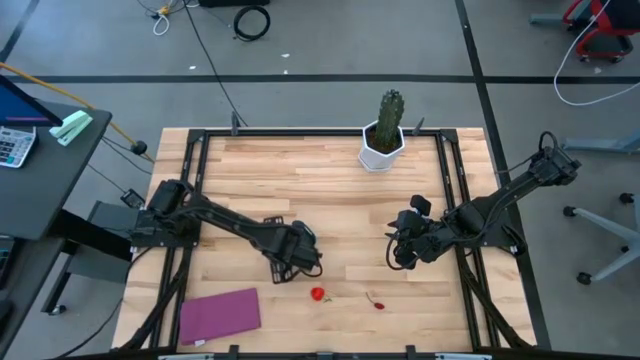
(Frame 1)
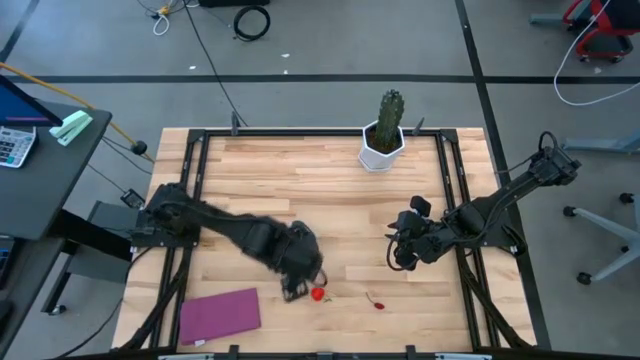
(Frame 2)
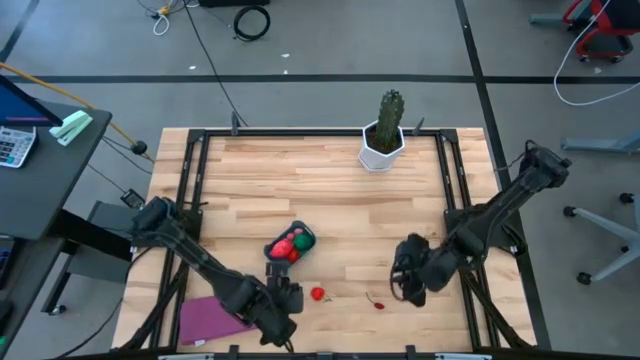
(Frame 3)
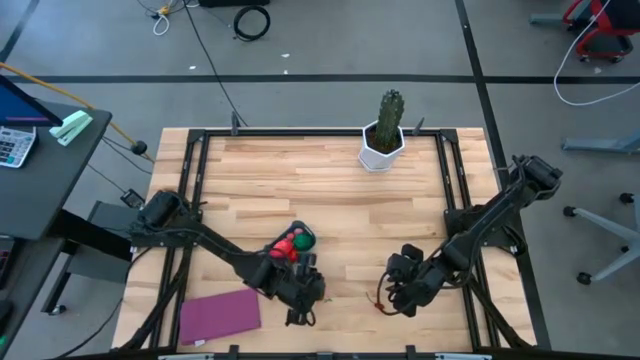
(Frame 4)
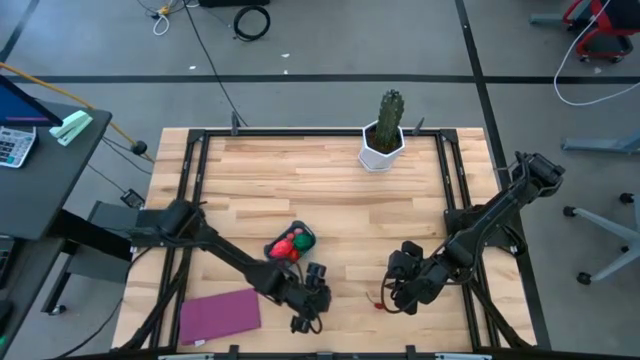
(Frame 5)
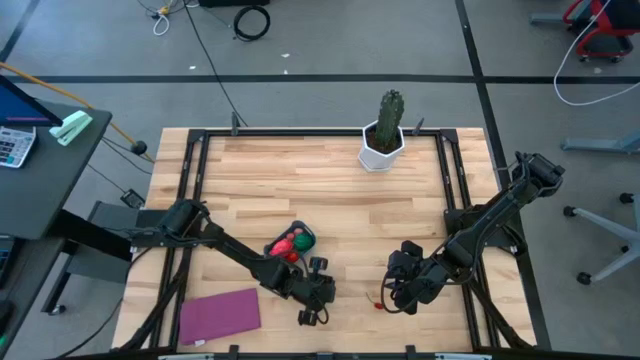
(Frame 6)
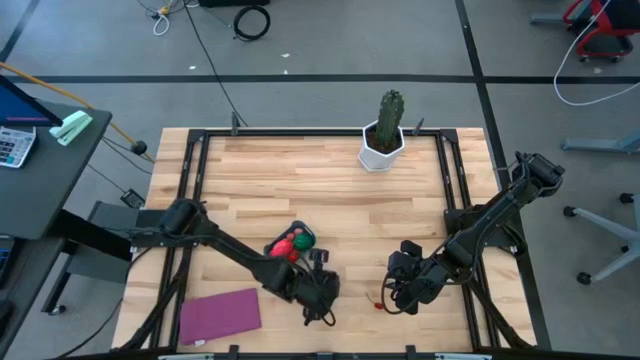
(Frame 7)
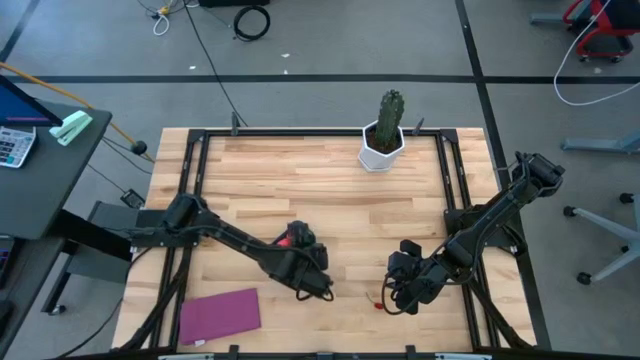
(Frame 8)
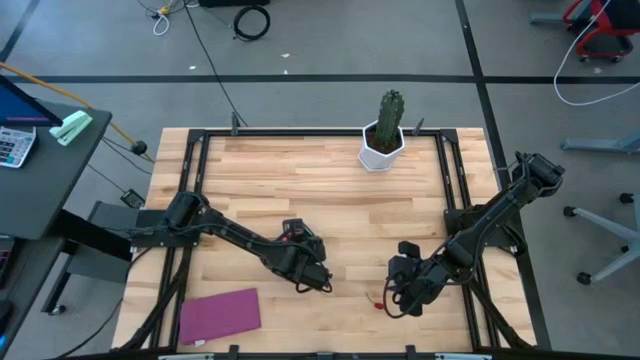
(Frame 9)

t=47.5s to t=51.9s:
Task: Pick and placing Produce into tupperware
Put the red strawberry into the blue bin

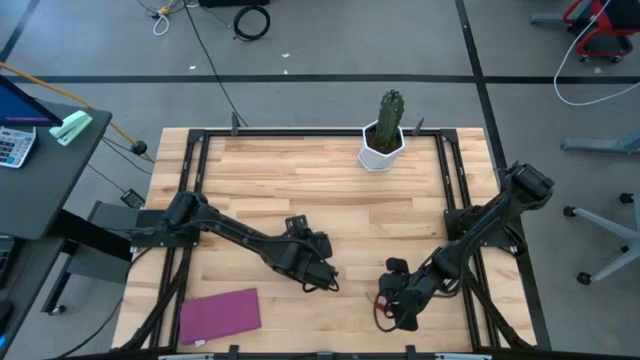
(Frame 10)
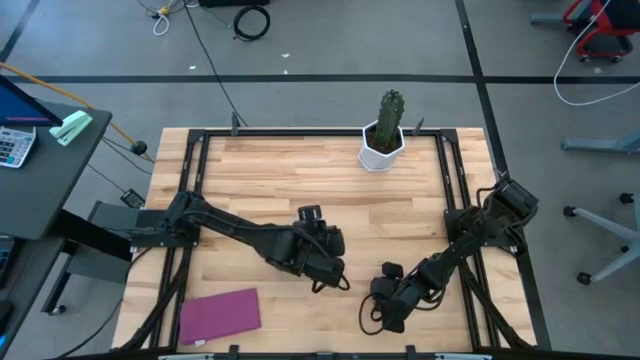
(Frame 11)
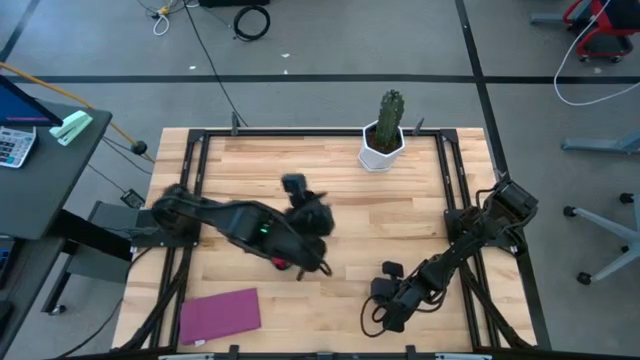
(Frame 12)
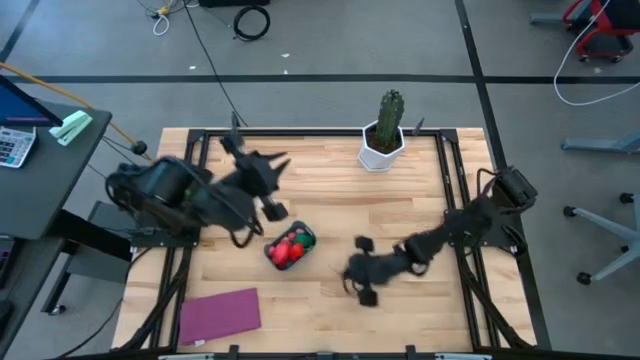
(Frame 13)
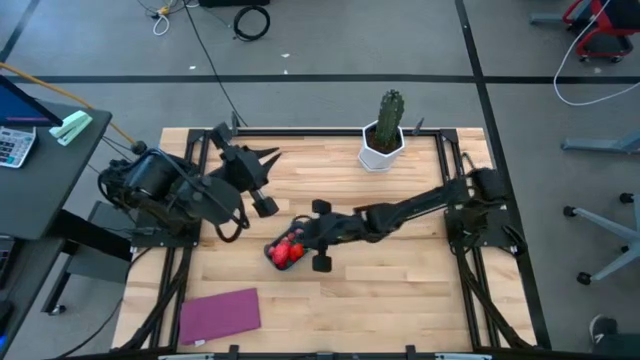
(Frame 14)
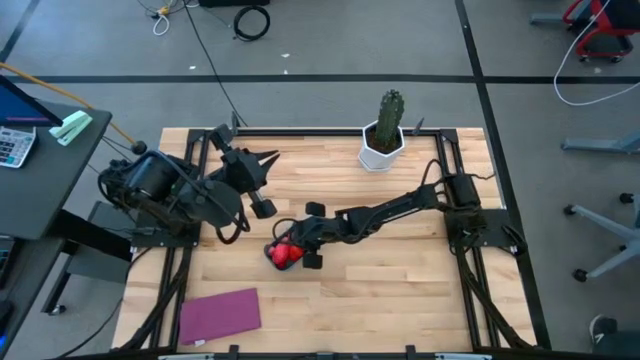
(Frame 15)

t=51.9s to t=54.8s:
Put the red cherry into the blue bin

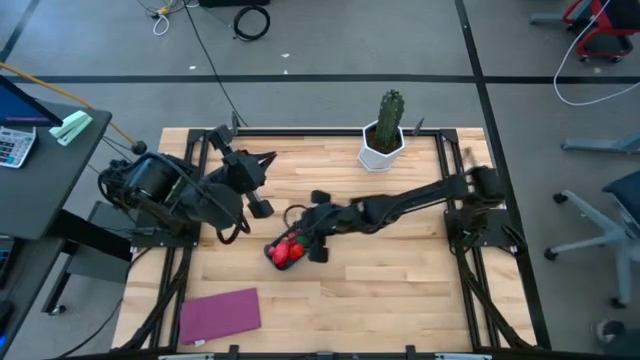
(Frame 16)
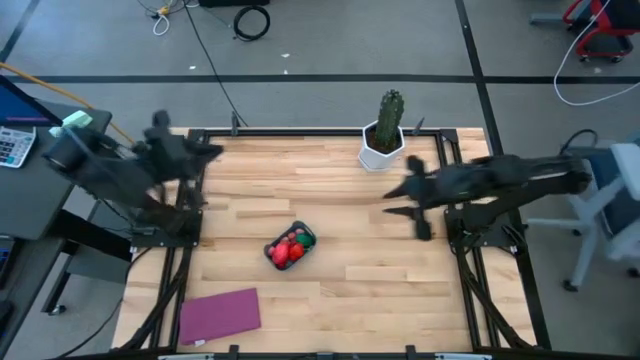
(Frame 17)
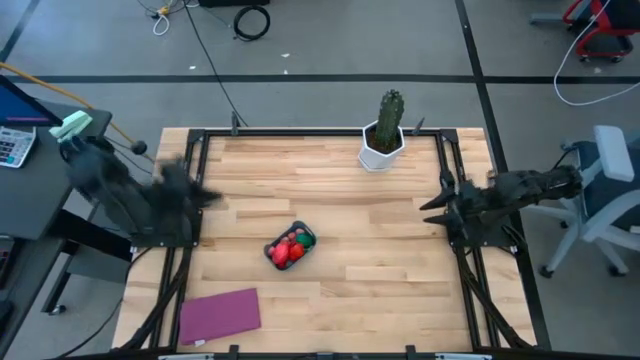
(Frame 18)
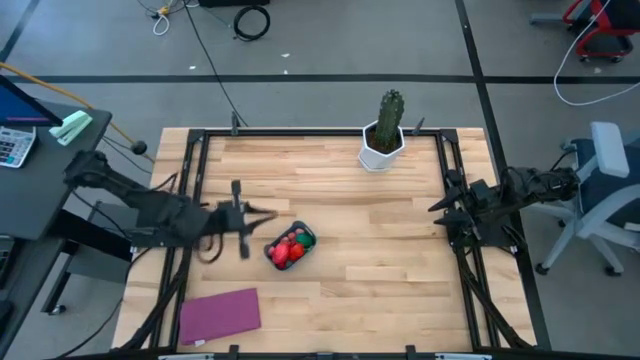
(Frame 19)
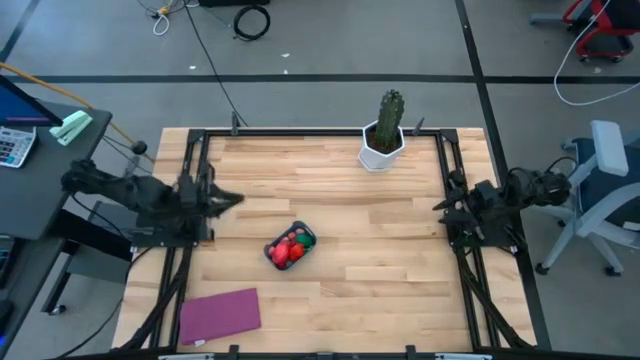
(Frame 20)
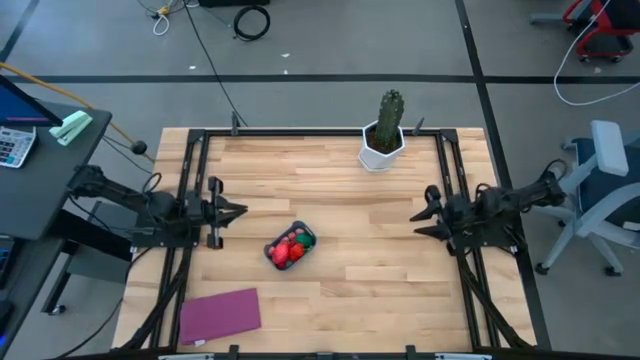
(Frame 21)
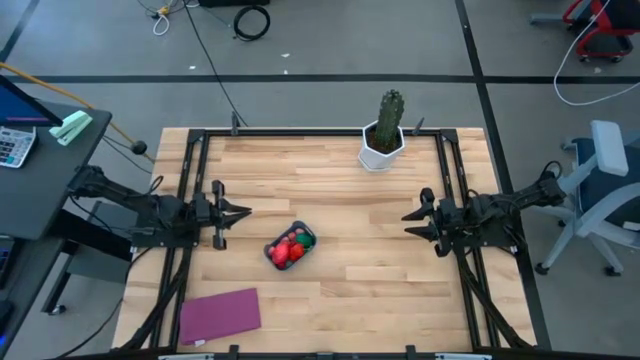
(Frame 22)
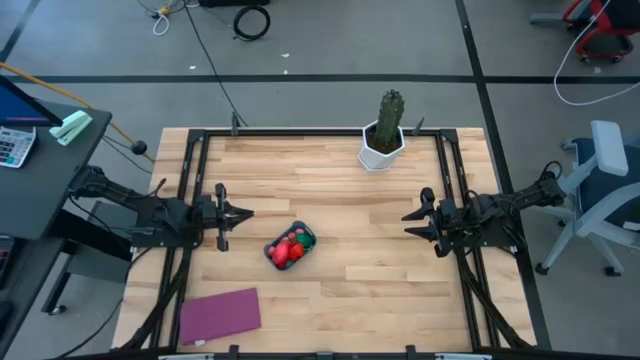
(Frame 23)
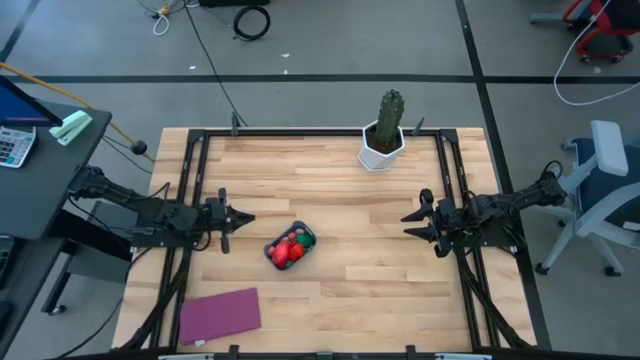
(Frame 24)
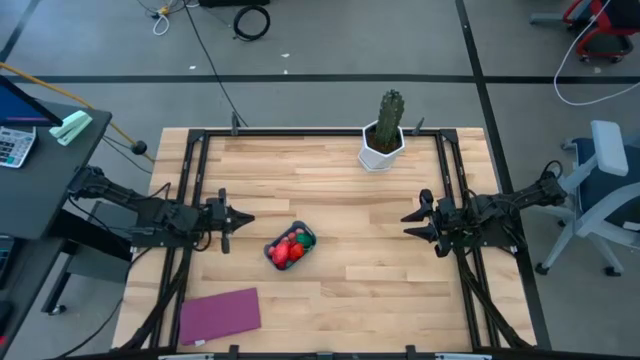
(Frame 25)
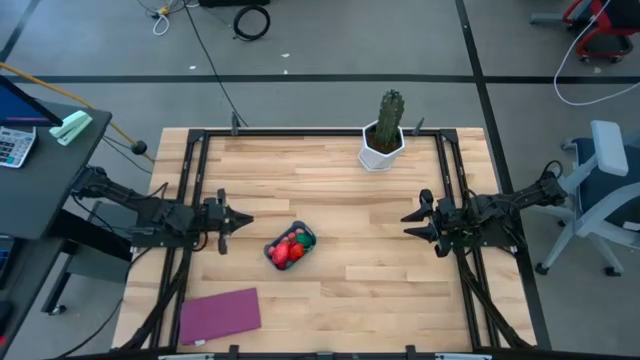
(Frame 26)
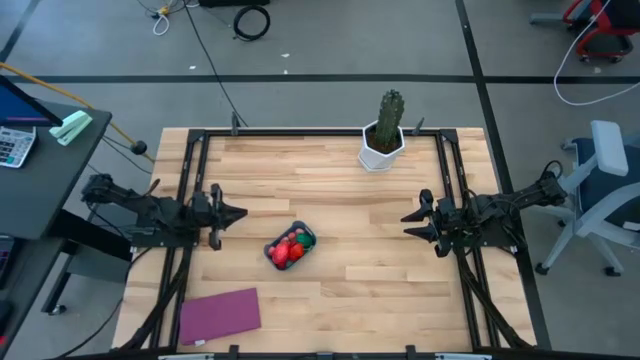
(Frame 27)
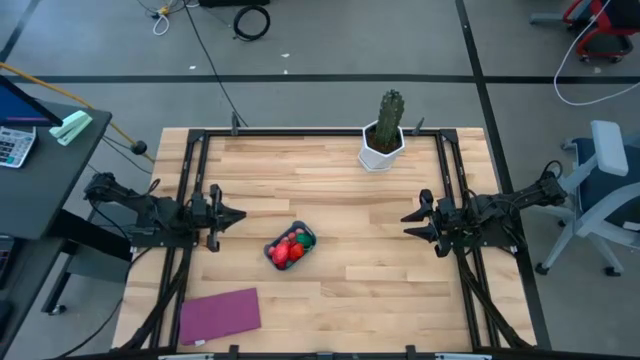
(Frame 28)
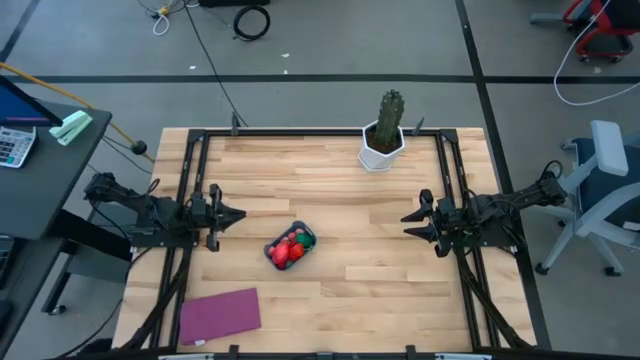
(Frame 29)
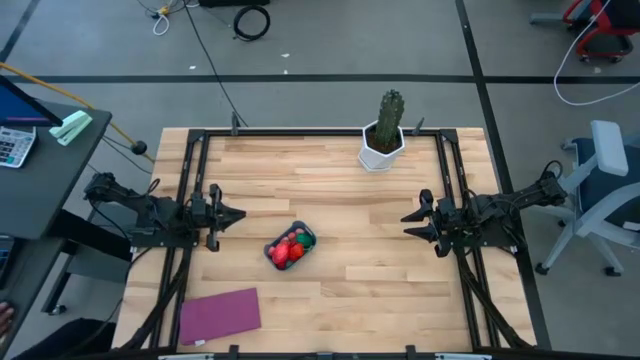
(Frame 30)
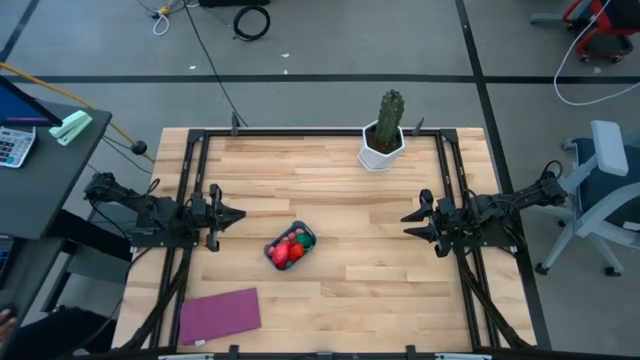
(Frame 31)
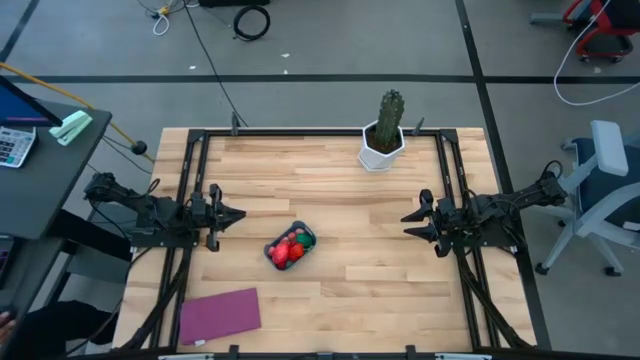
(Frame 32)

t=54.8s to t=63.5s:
Return to Home Position

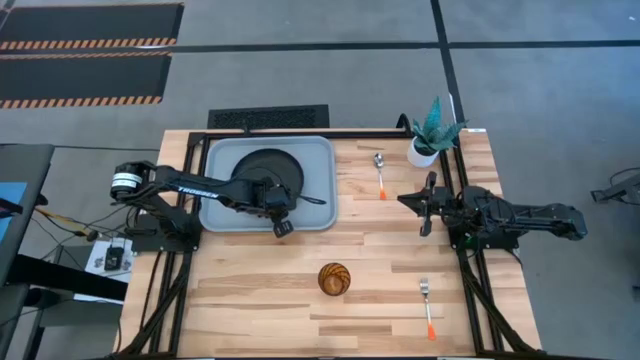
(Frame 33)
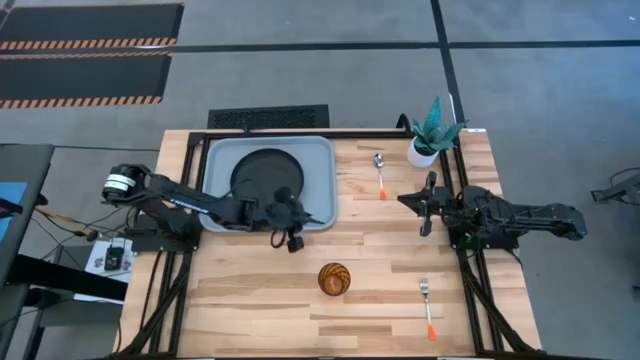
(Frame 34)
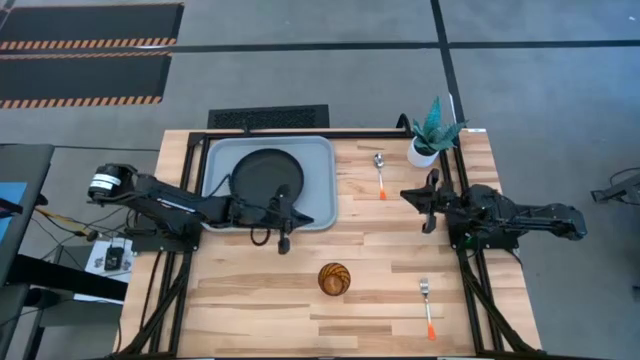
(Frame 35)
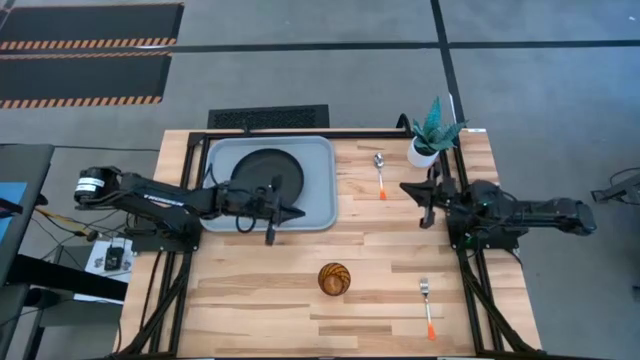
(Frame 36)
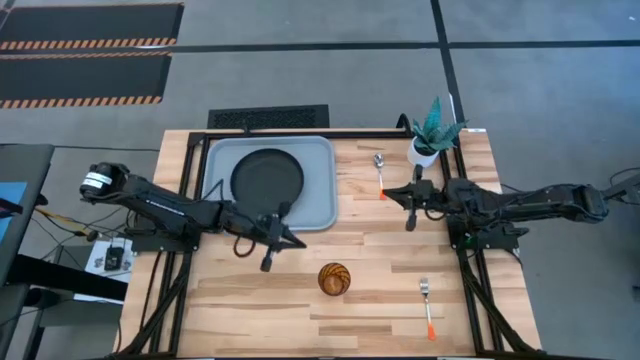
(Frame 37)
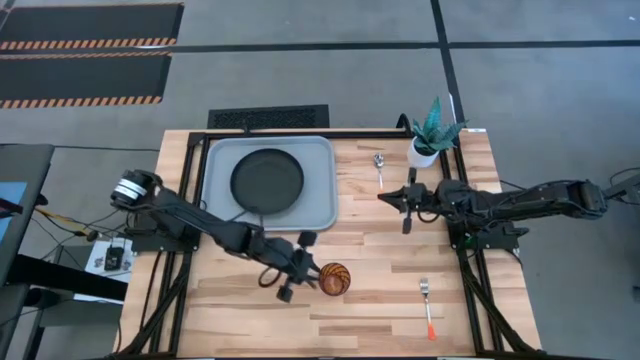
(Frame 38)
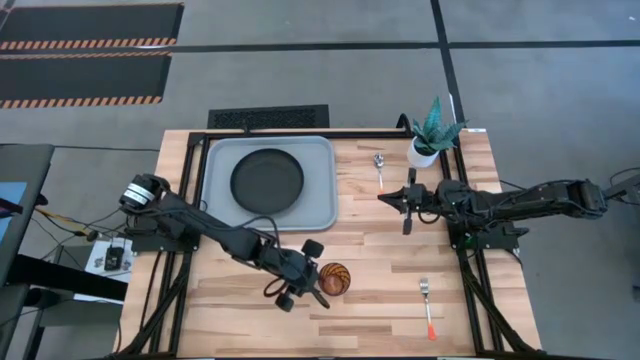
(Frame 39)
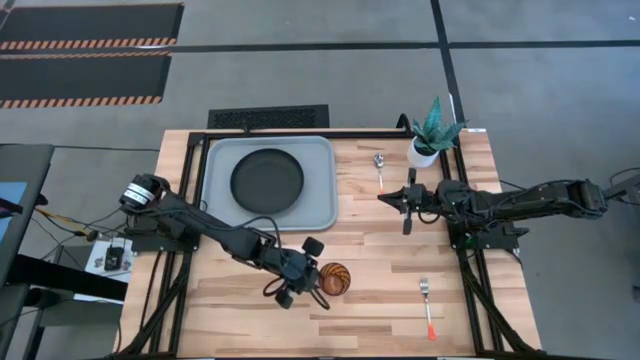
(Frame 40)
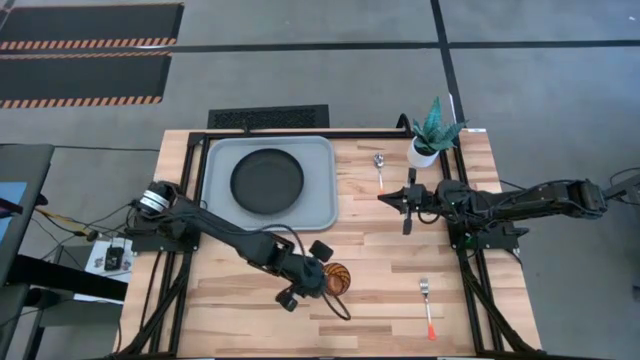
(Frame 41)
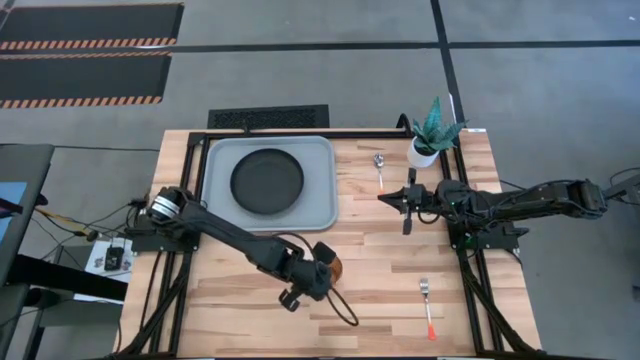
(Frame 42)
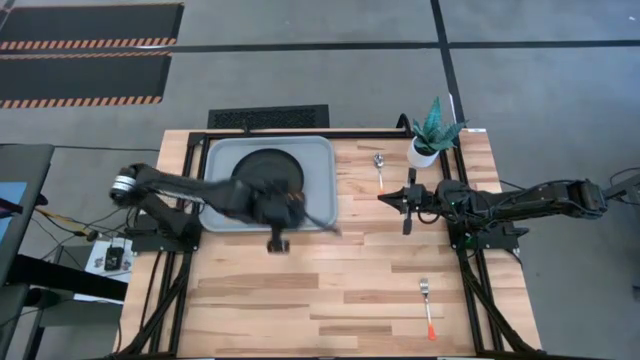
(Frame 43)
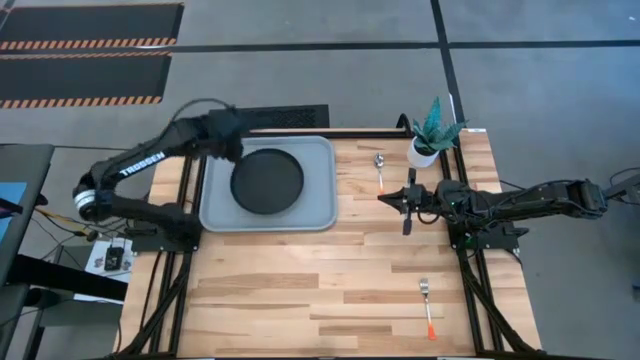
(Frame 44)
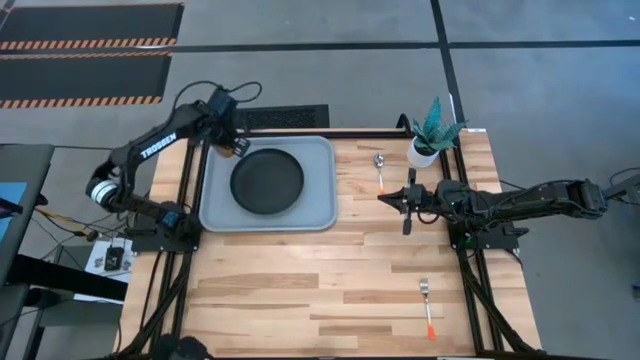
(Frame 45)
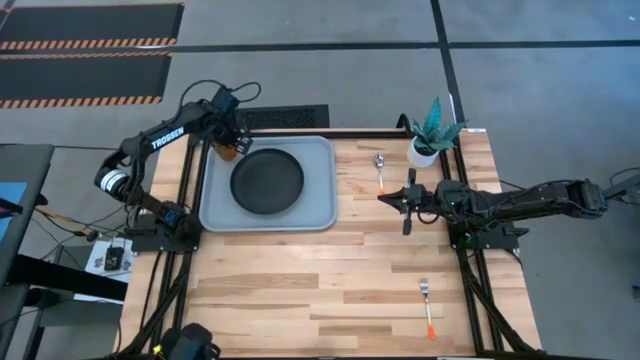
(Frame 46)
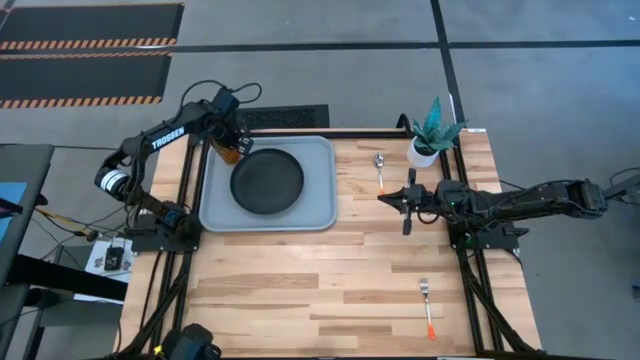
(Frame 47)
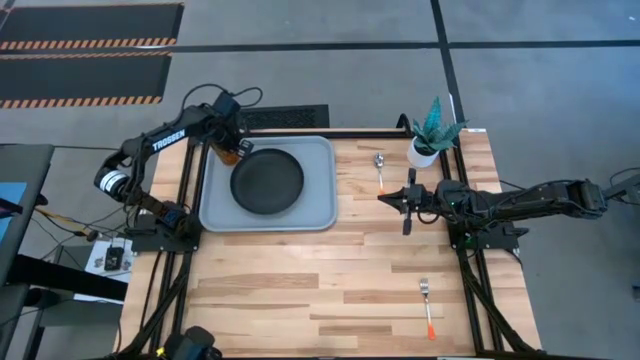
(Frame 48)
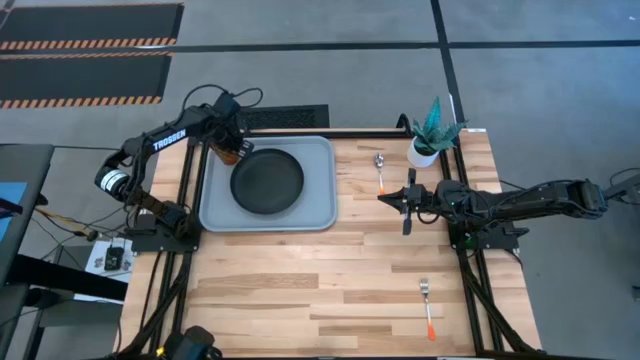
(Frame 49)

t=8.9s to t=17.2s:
Task: Pick and place plate/cup/fork/spoon on tray
Put the brown glass on the gray serving tray to the top left of the black plate
